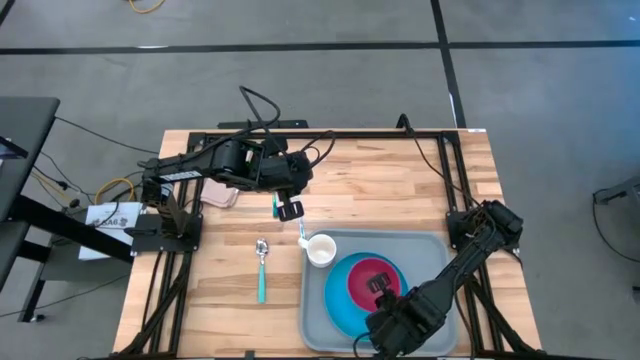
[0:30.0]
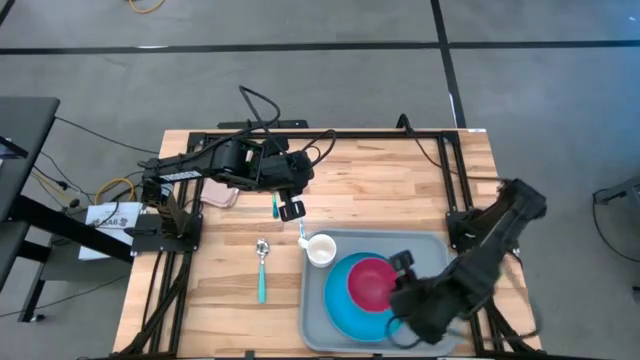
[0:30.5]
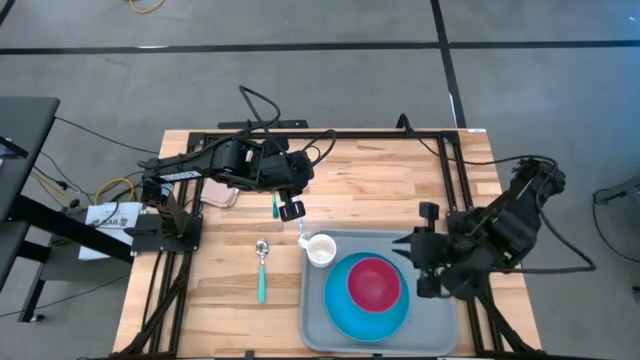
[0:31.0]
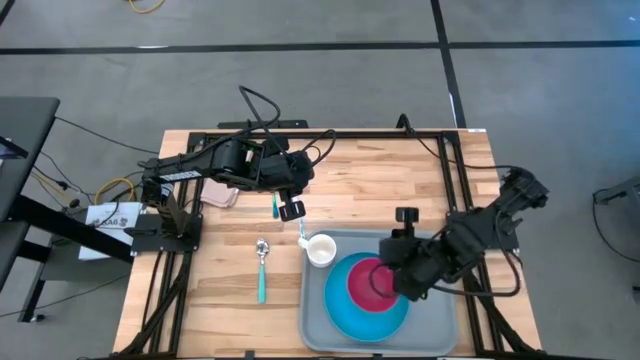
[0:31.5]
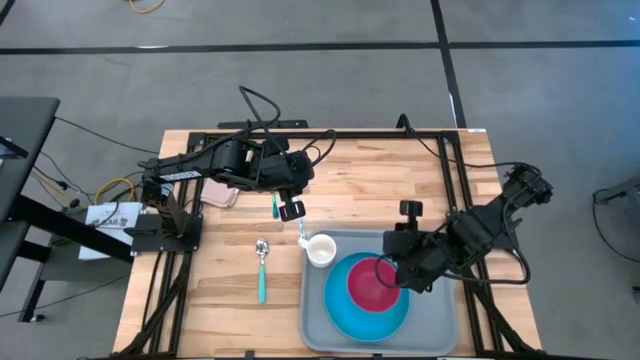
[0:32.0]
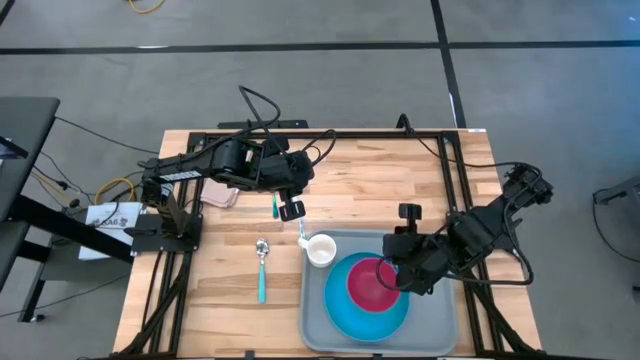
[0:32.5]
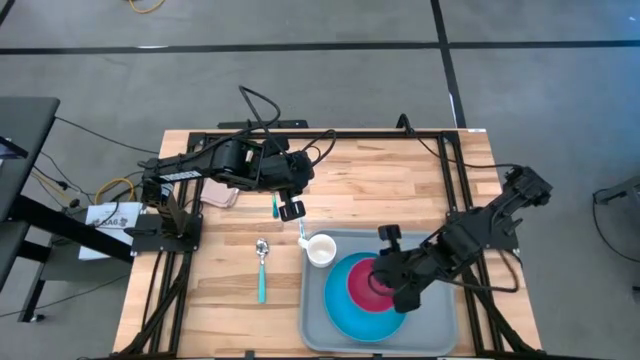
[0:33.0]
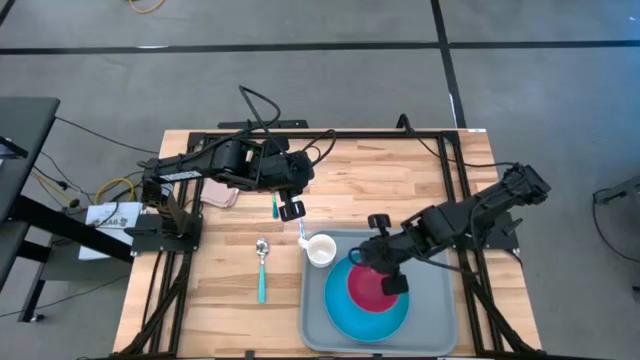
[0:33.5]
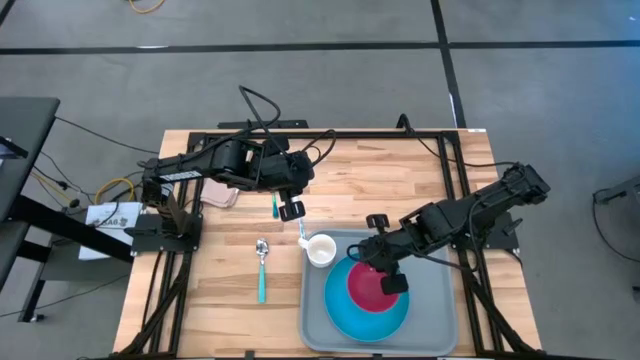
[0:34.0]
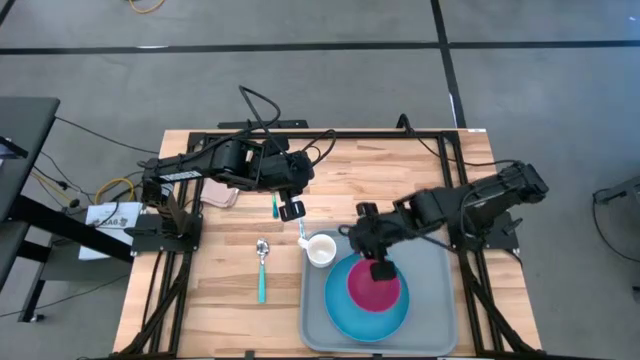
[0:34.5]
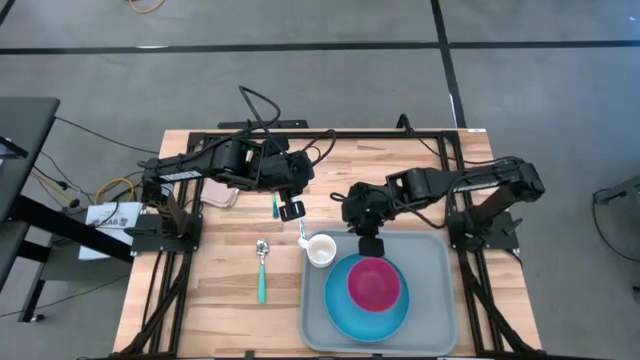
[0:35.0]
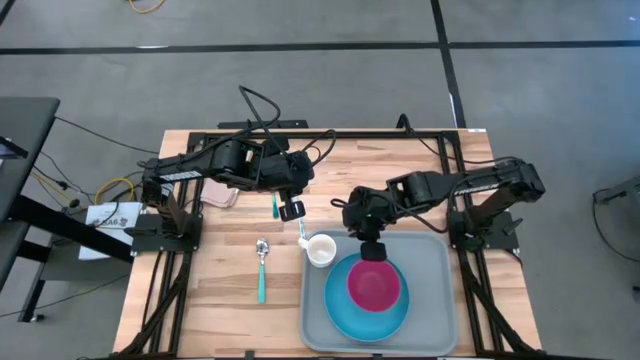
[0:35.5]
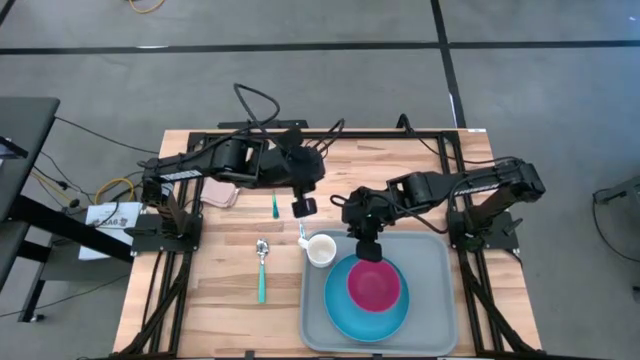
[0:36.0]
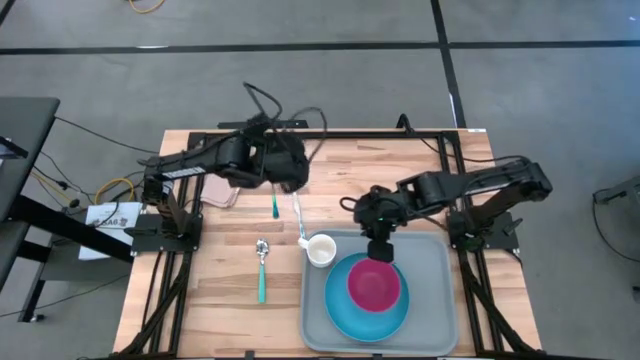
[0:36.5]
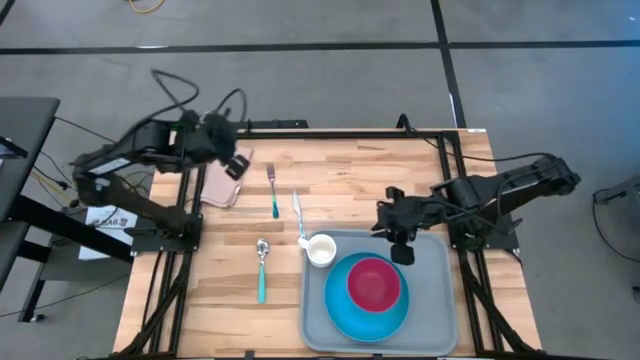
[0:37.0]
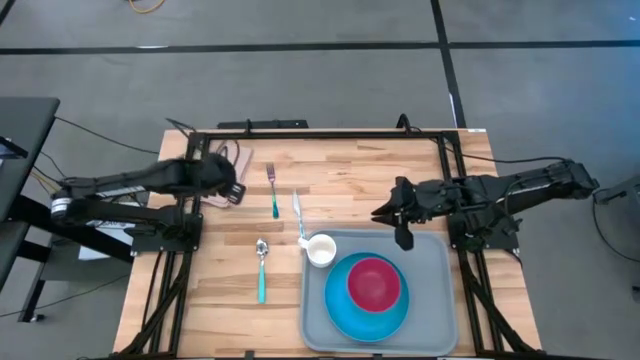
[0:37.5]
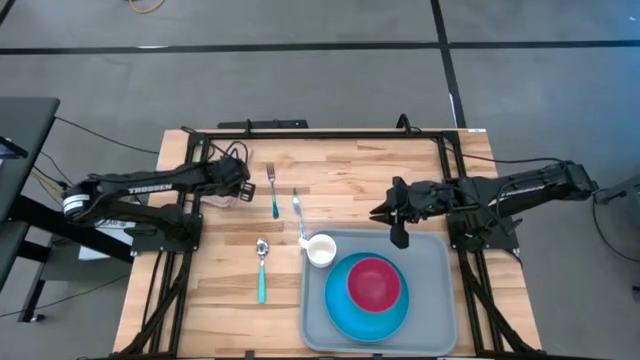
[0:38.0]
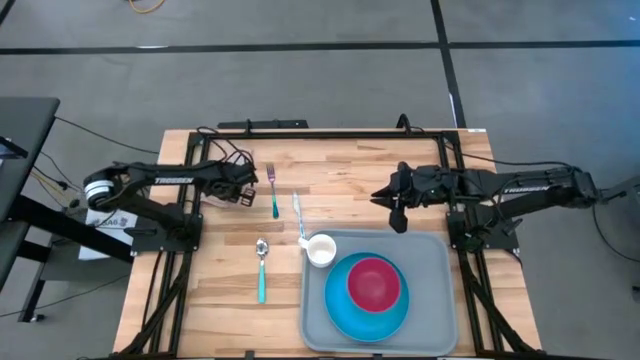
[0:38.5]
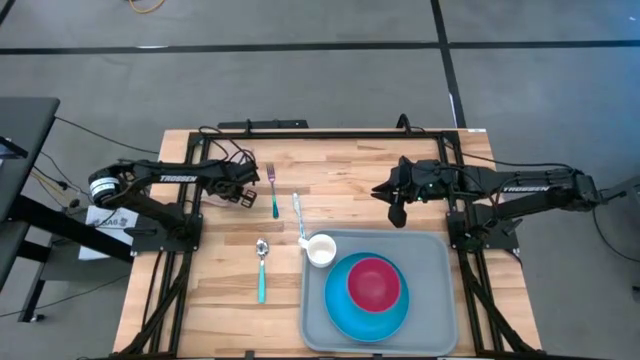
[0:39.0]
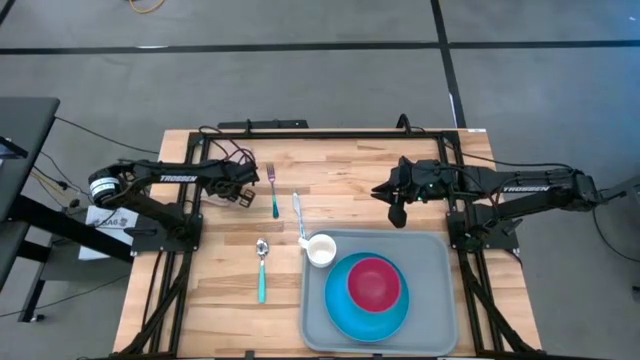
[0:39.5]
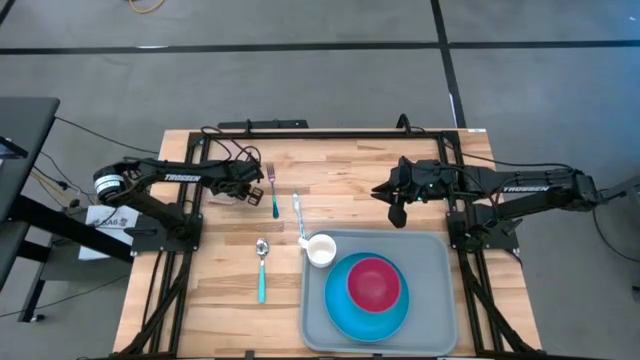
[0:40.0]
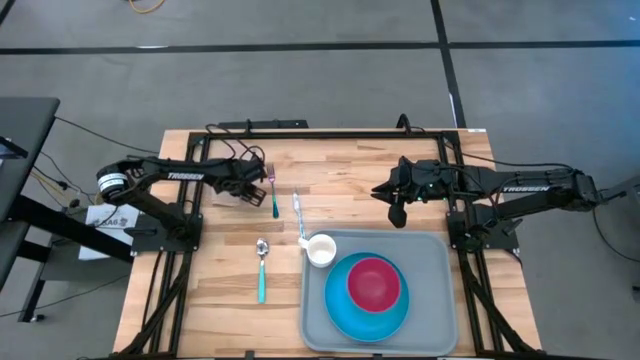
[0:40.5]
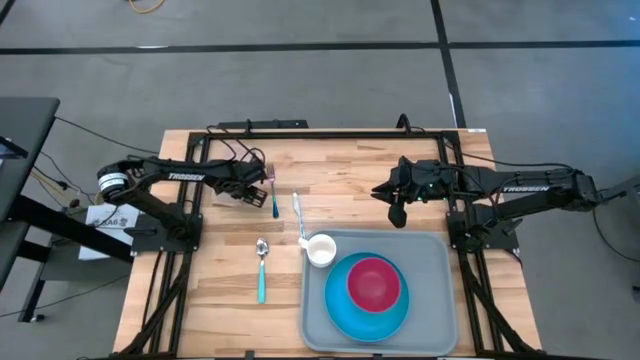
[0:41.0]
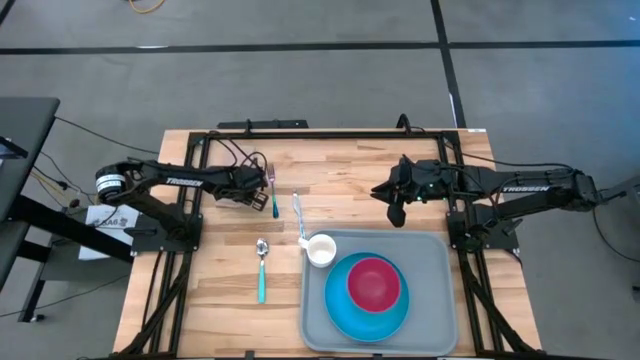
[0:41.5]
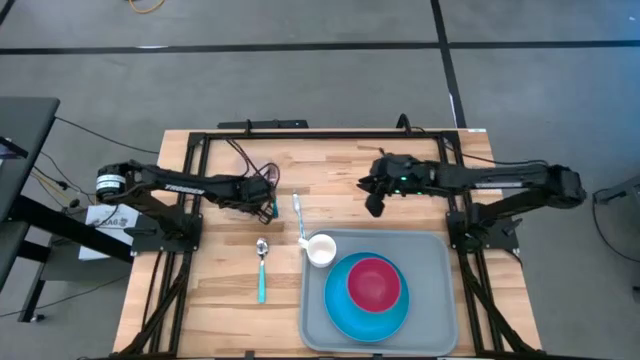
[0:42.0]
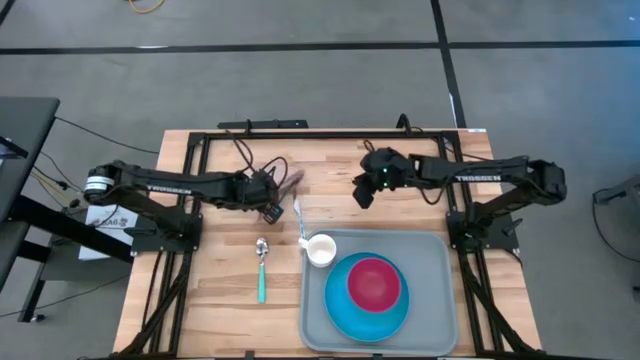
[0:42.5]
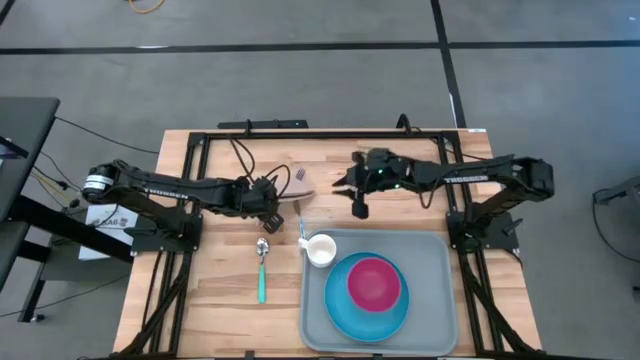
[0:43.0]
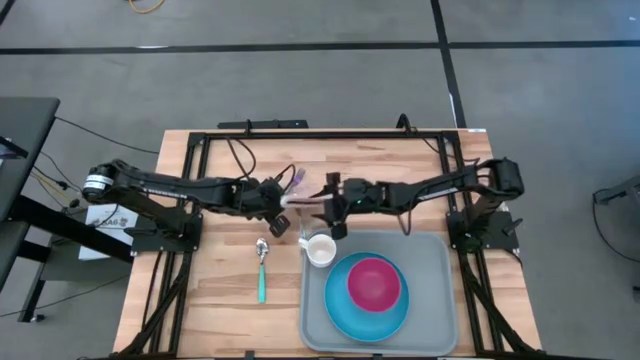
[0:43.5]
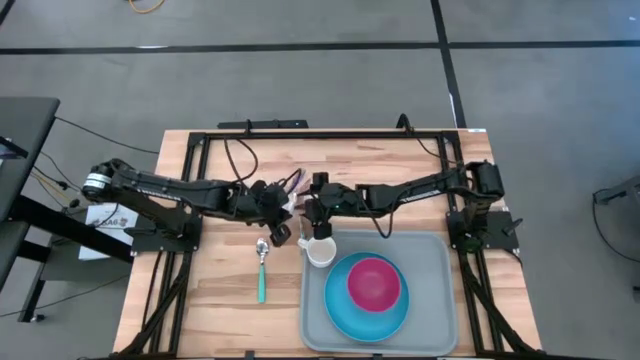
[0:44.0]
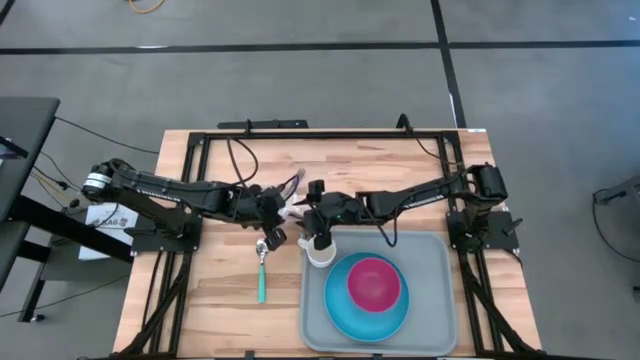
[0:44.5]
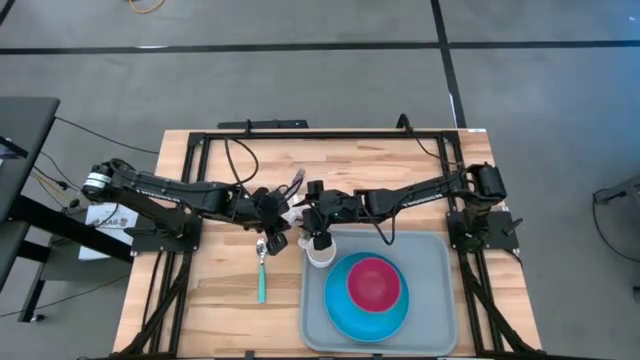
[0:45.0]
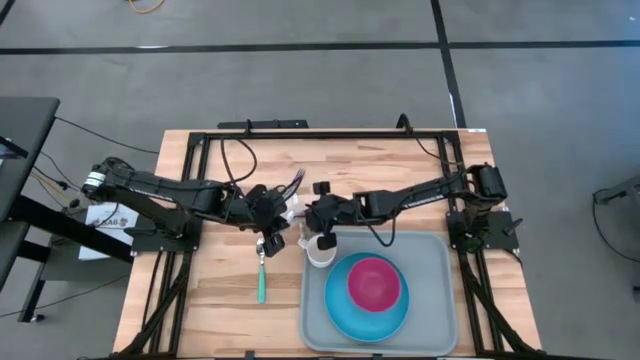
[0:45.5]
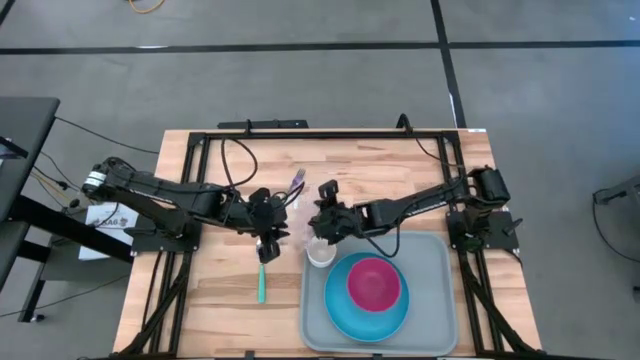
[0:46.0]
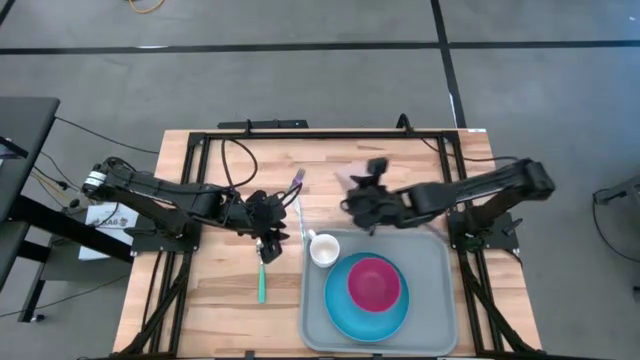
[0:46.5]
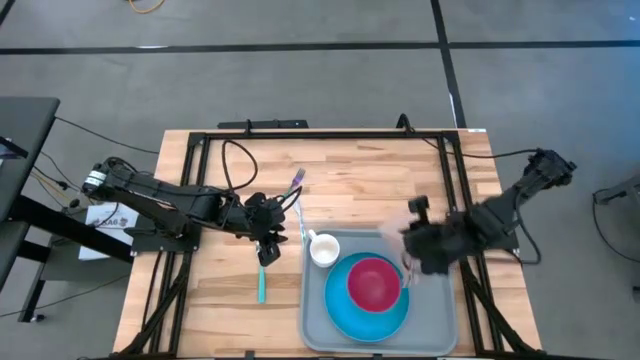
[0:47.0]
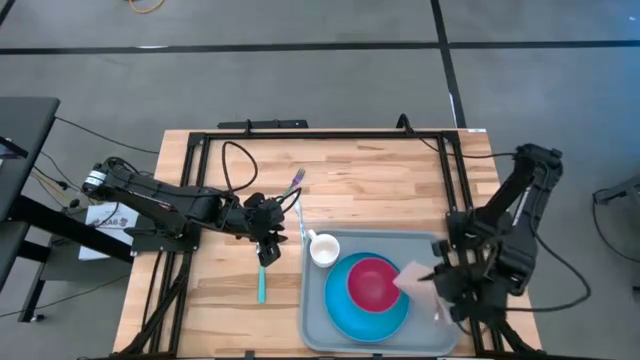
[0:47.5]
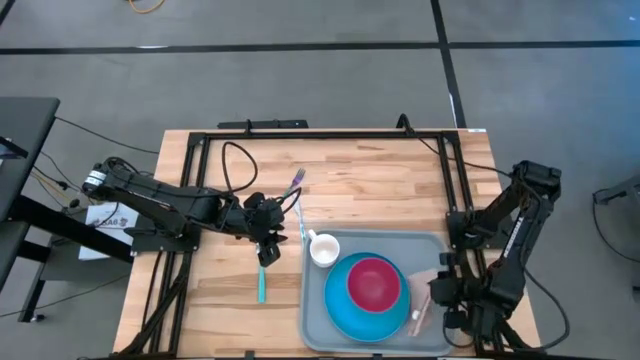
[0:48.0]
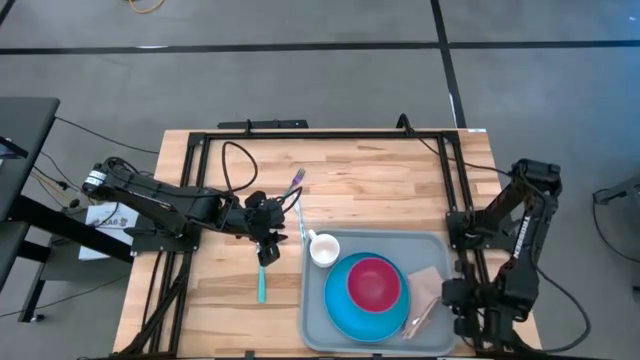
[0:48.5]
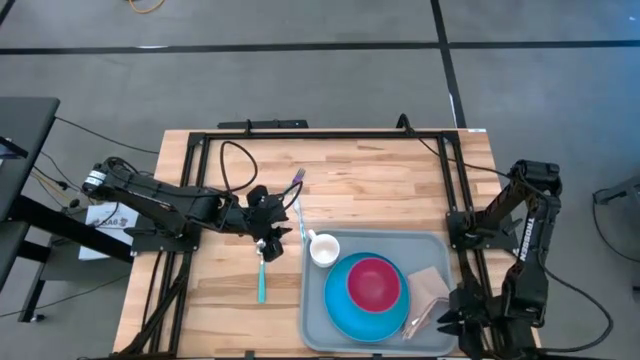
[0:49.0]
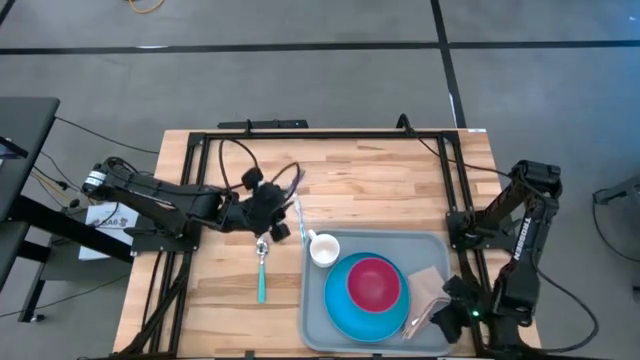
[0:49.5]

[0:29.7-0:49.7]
Task: Set up tray
Put the brown napkin on the gray tray
